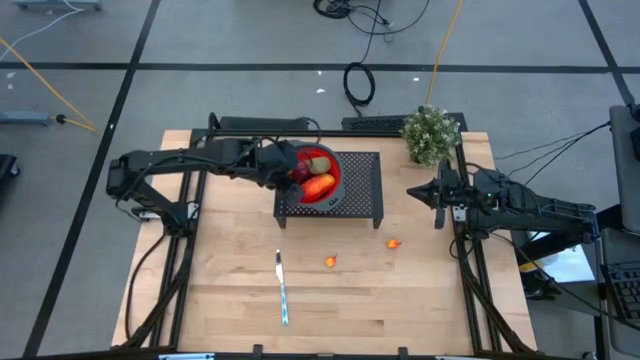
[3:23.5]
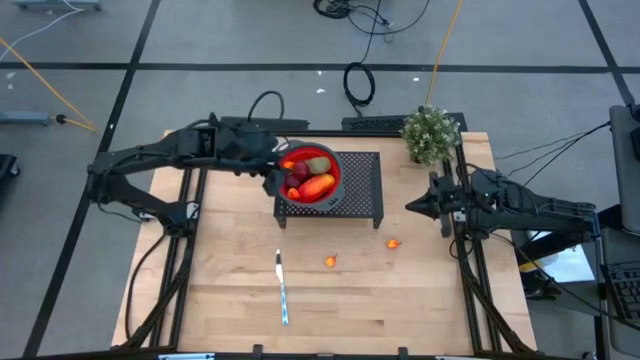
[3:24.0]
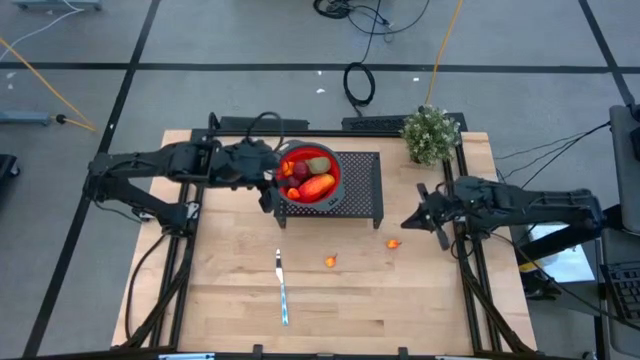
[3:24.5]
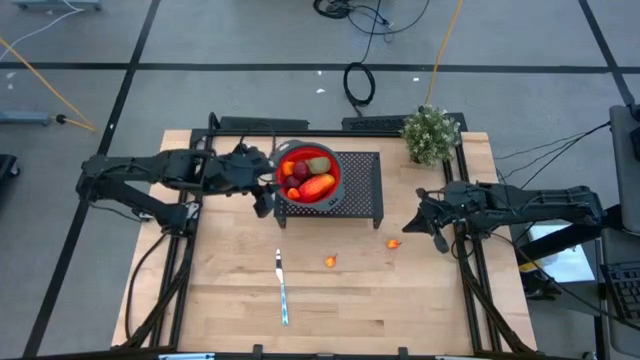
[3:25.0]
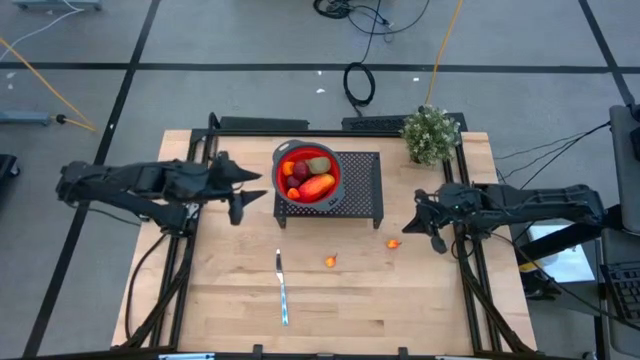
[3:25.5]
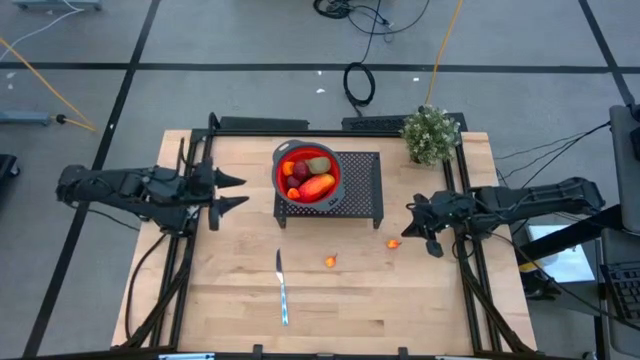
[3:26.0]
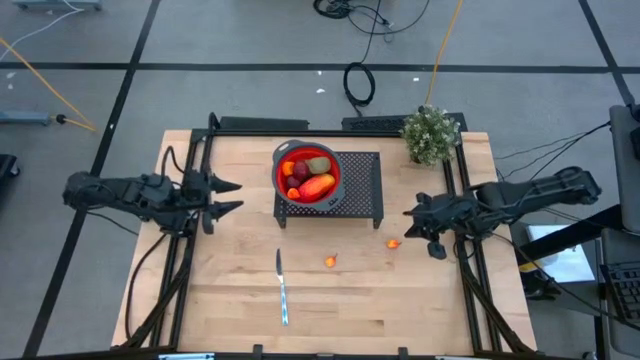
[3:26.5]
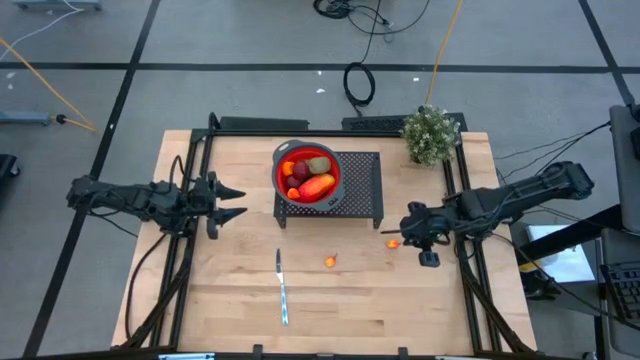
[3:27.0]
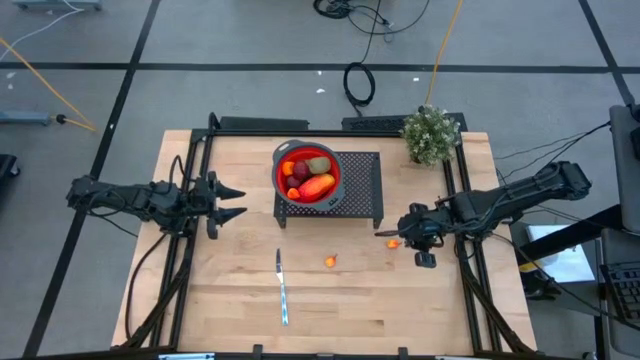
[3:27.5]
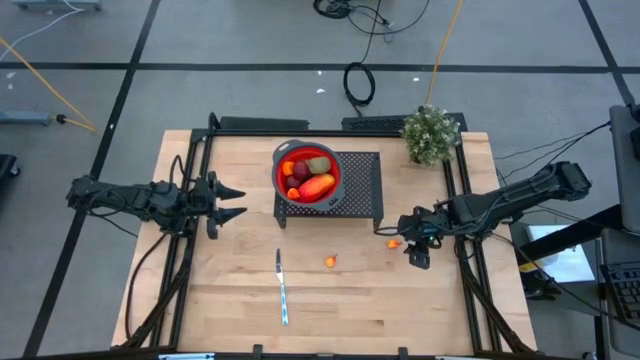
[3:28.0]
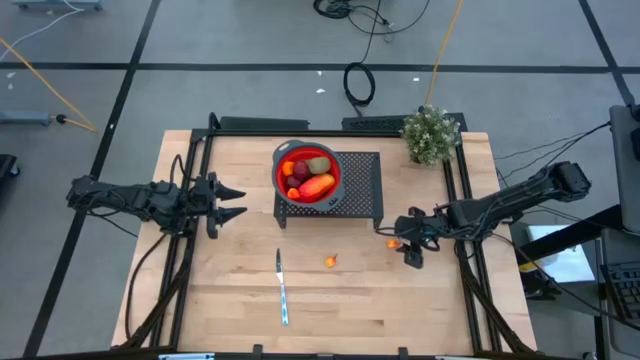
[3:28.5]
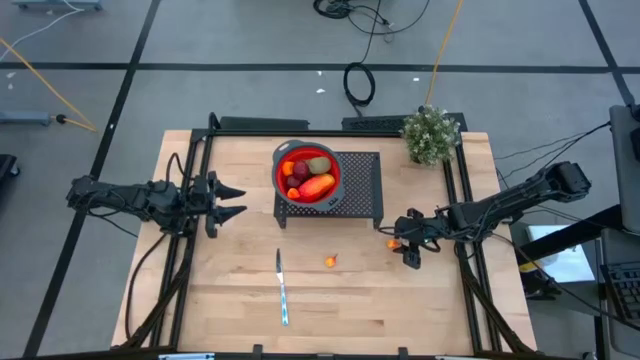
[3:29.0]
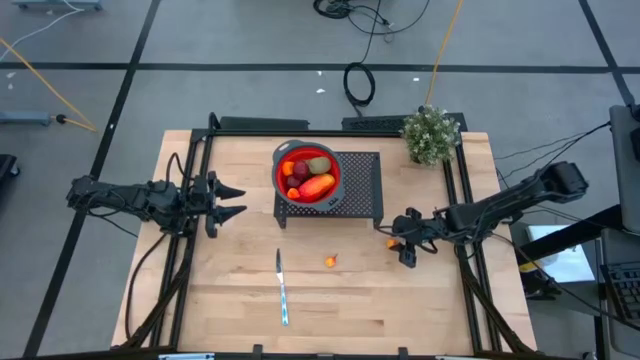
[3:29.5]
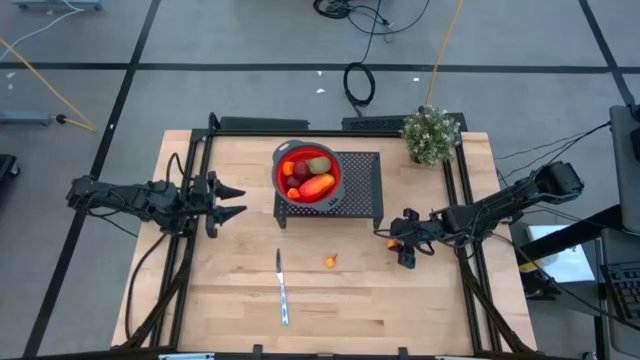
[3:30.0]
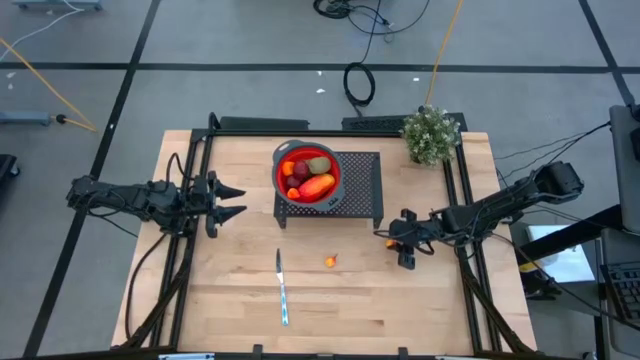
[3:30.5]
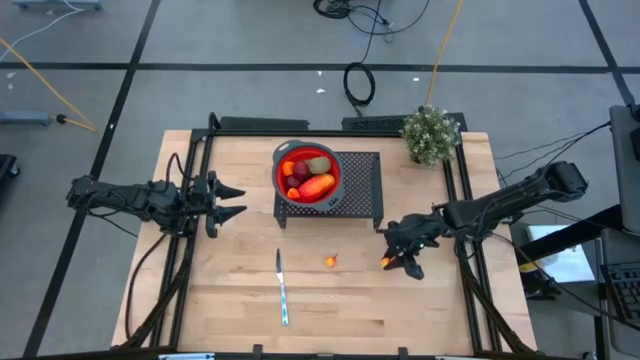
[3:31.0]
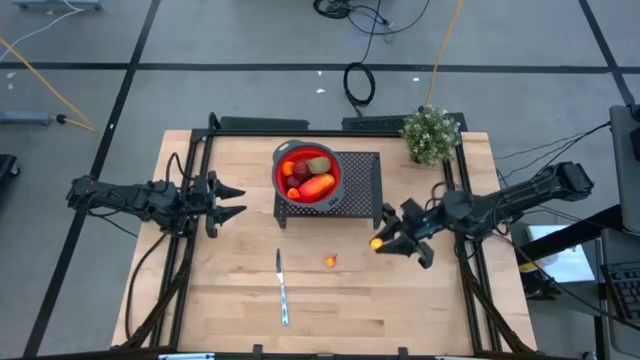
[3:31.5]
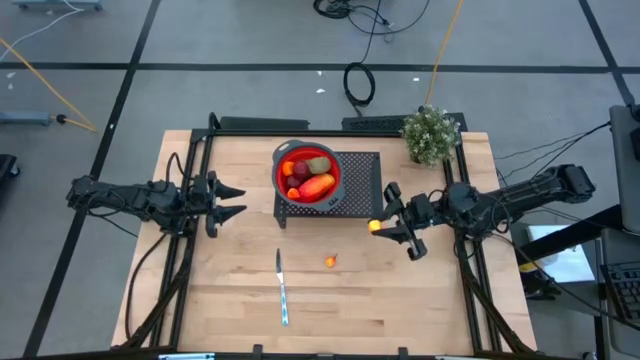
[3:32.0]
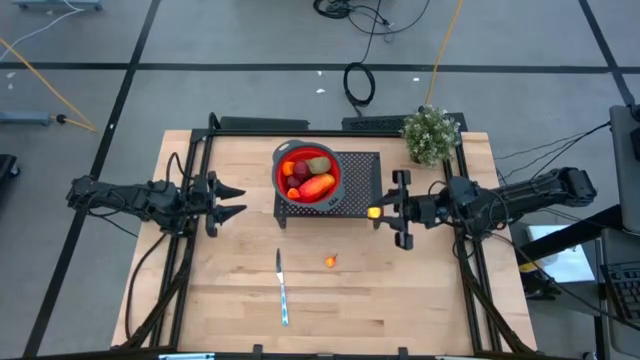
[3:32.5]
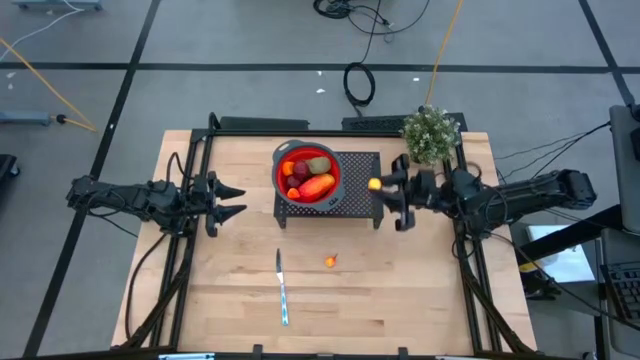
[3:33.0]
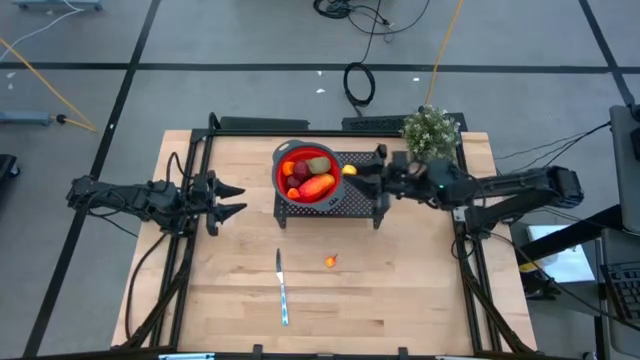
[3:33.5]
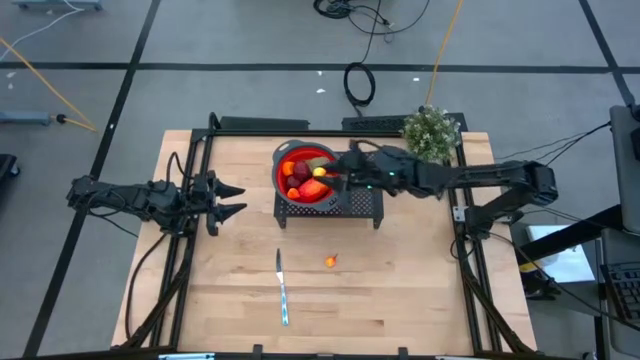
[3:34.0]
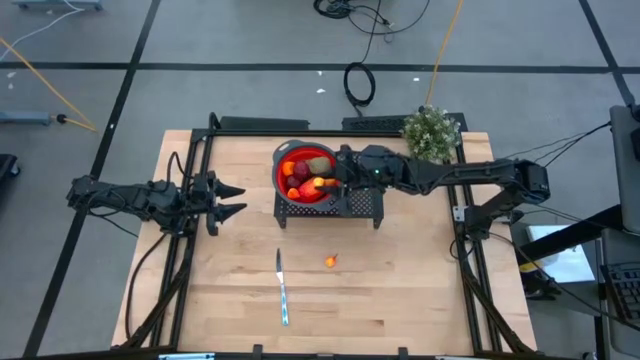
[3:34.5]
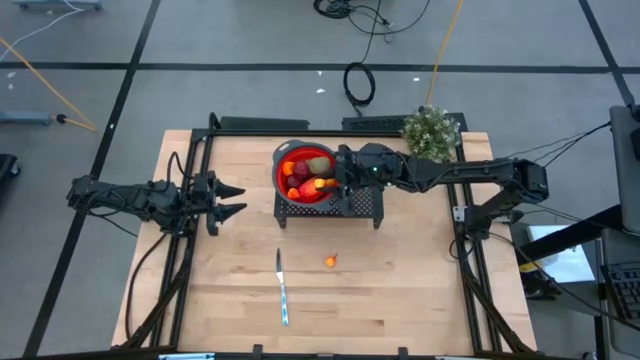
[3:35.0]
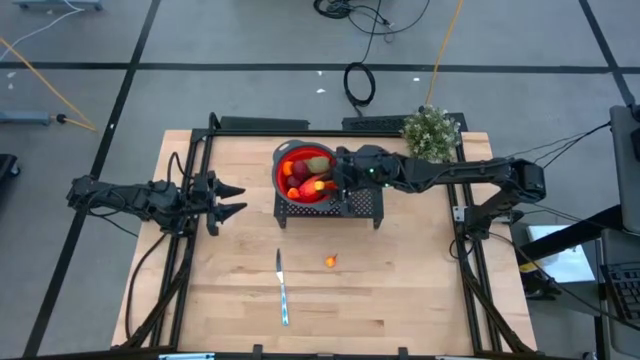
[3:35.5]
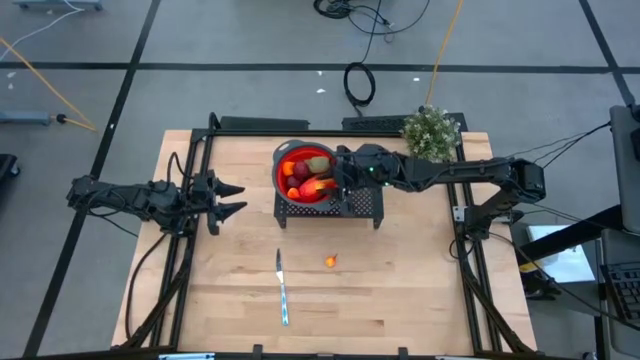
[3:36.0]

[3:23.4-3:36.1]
Task: Pick & Place Fruit
Put the right peach into the strainer on the shelf

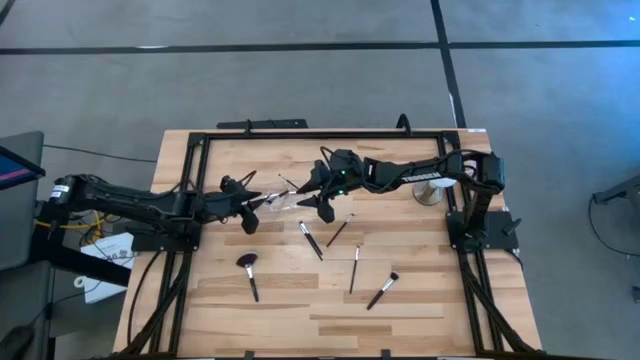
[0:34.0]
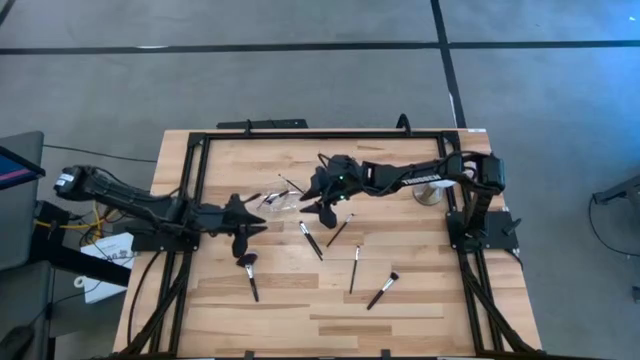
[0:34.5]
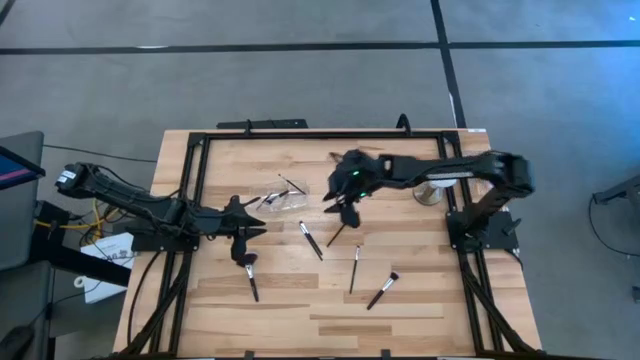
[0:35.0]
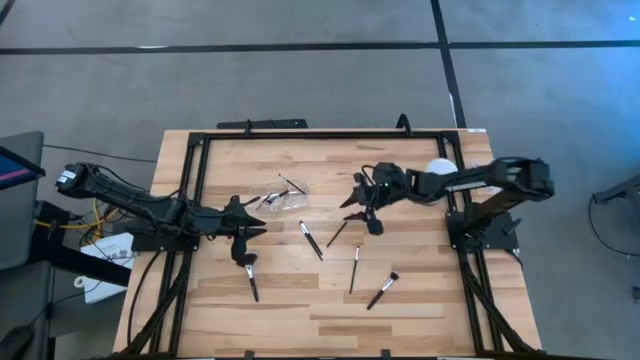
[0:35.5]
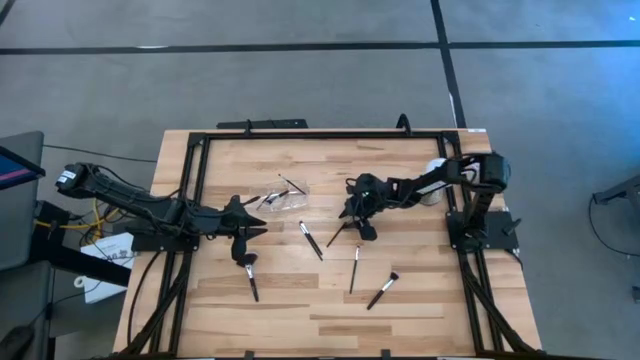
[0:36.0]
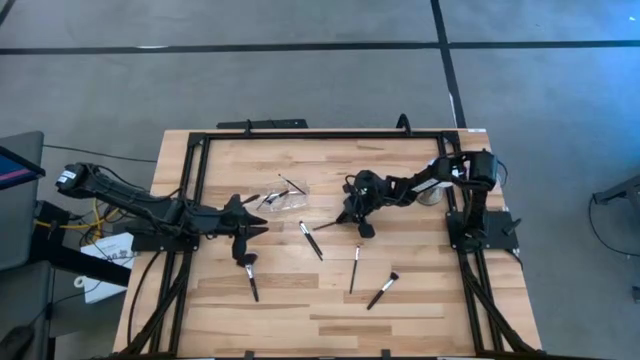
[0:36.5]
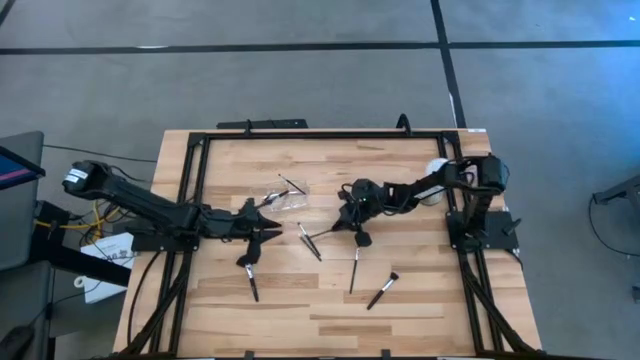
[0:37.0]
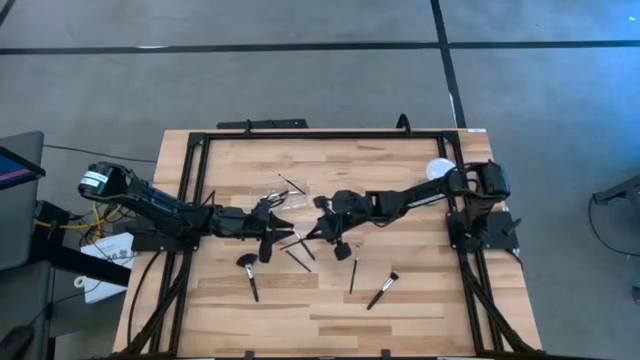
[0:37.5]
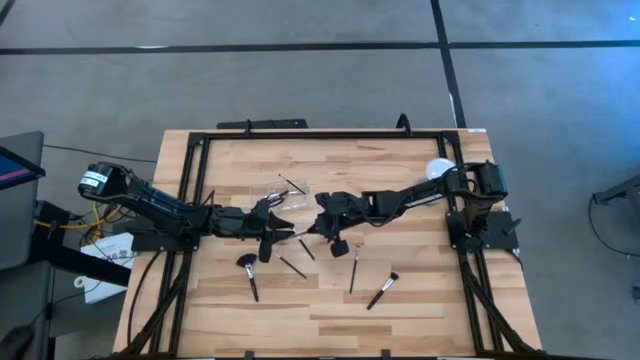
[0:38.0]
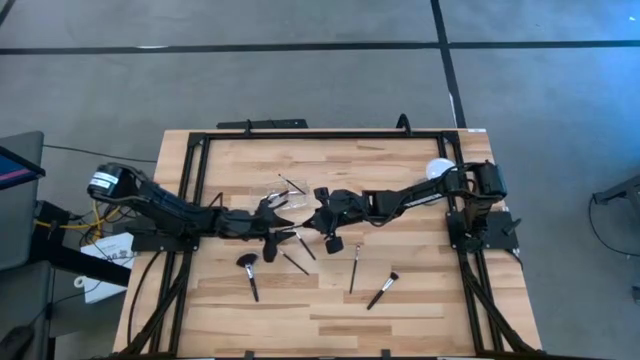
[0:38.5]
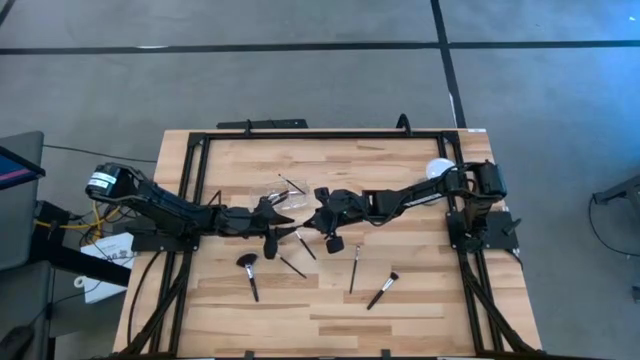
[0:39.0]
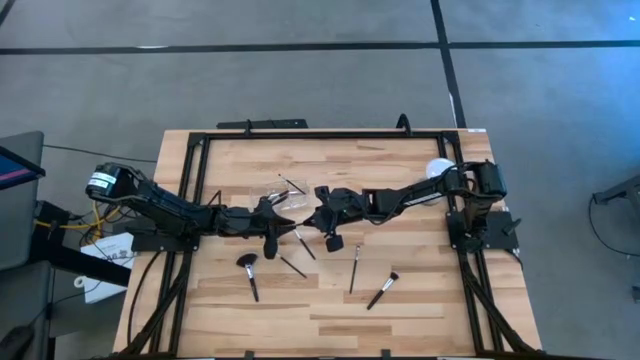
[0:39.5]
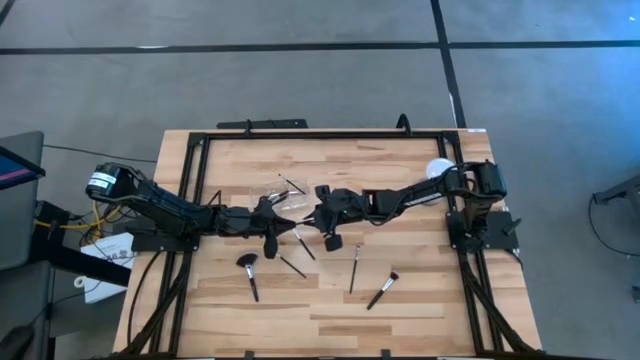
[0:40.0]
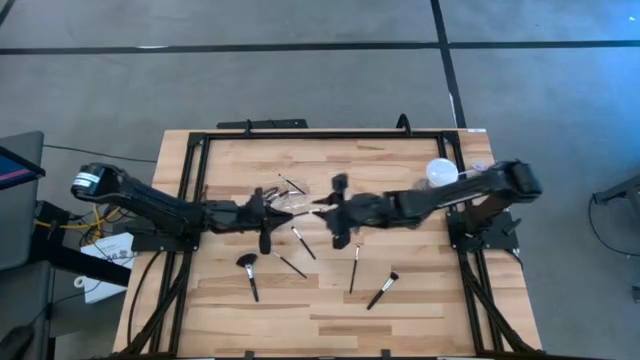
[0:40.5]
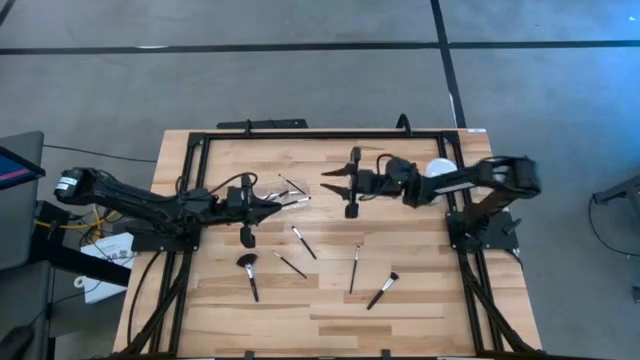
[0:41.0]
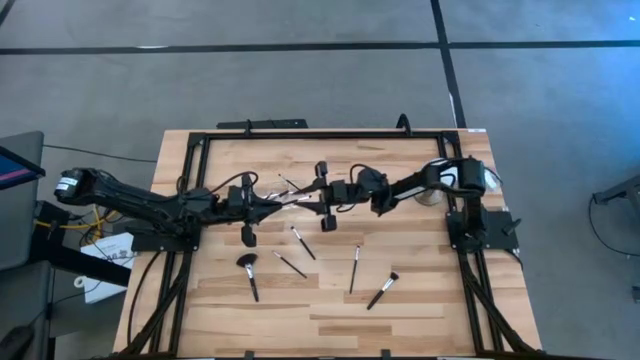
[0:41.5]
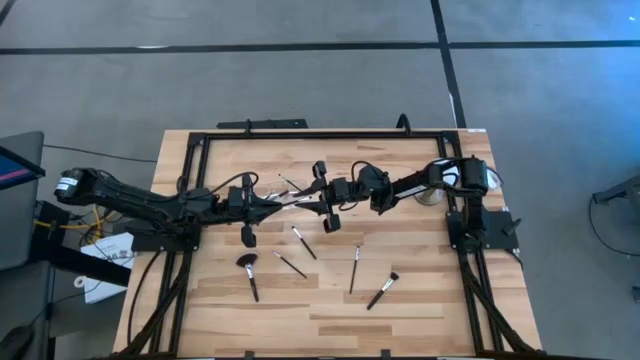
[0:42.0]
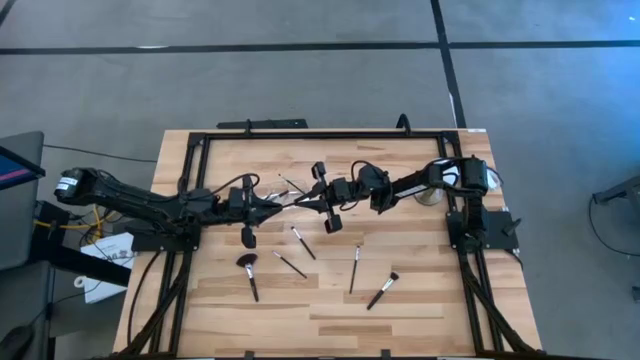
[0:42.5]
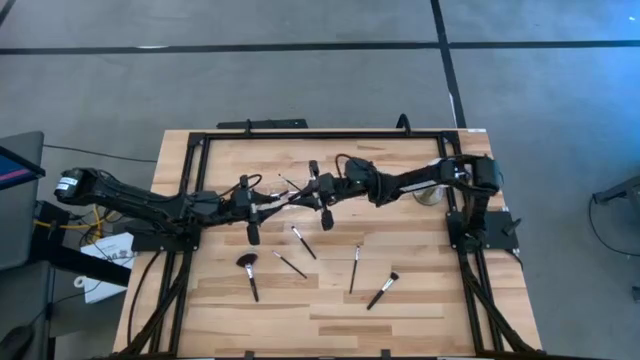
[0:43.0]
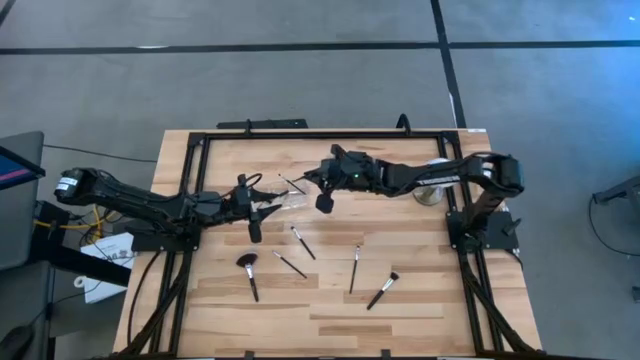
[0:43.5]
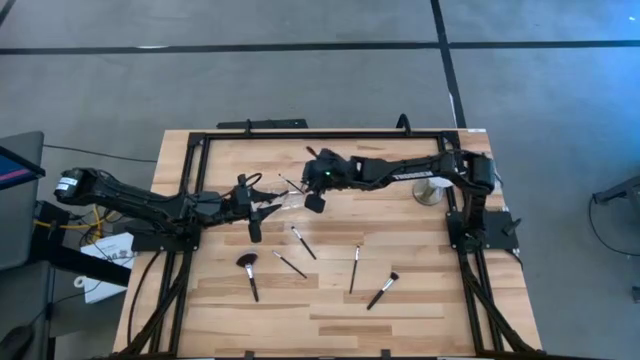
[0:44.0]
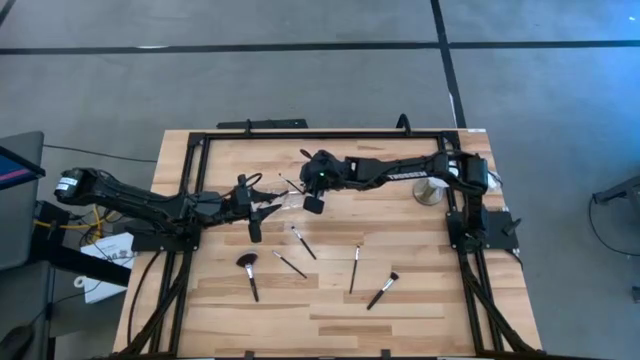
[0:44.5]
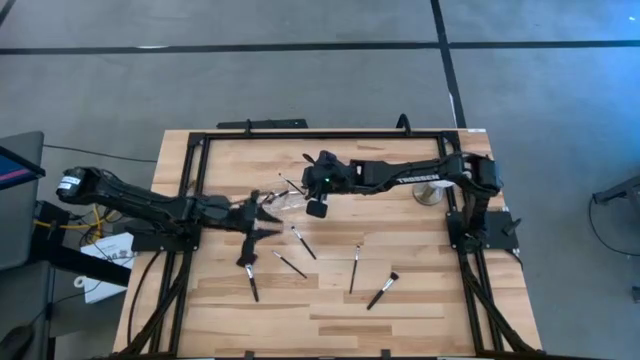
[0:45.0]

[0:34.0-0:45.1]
Task: Put items in baskets/containers
Put the eyeshadow brush into the transparent organizer
